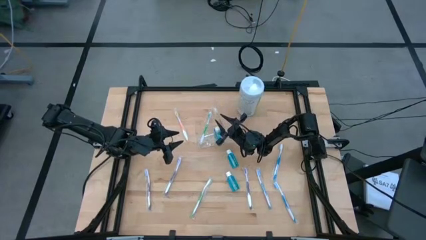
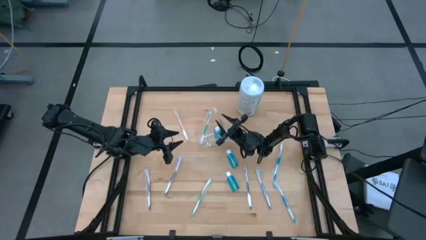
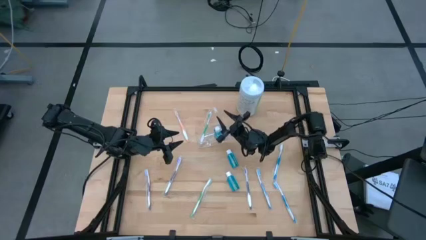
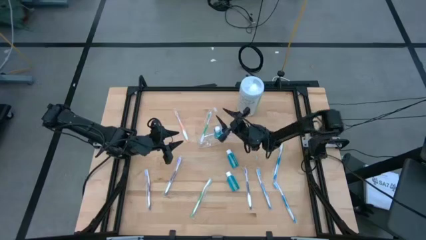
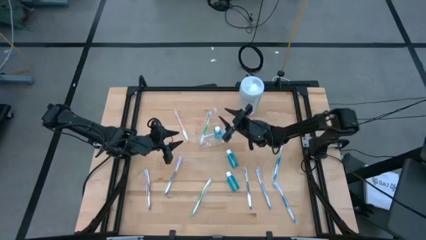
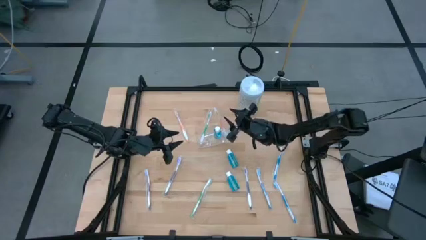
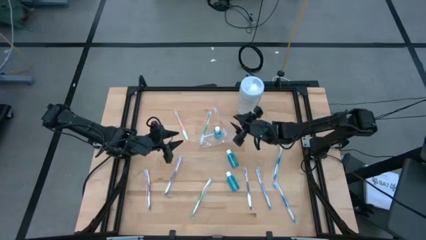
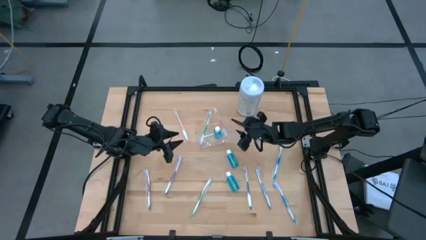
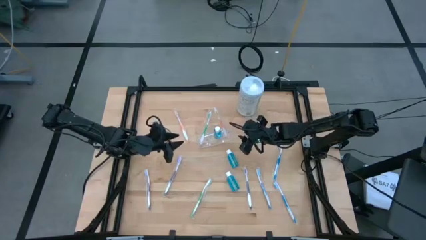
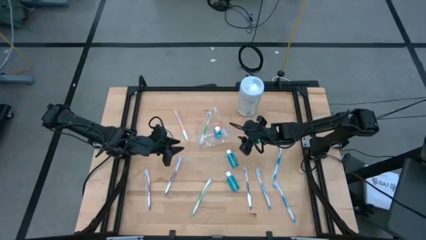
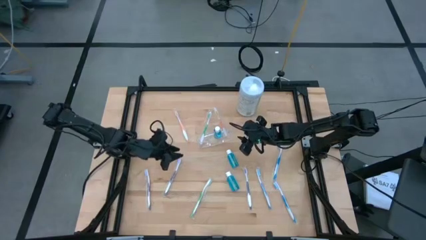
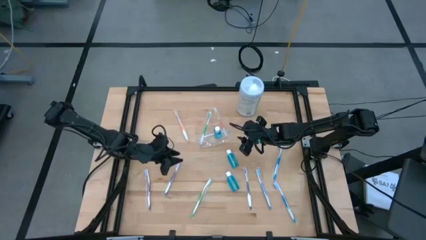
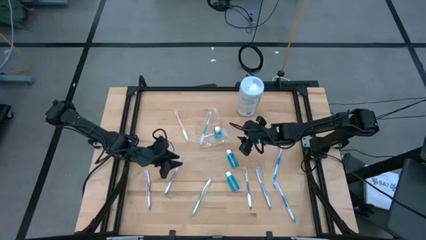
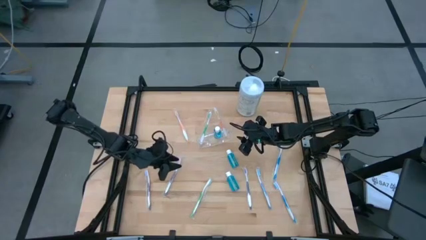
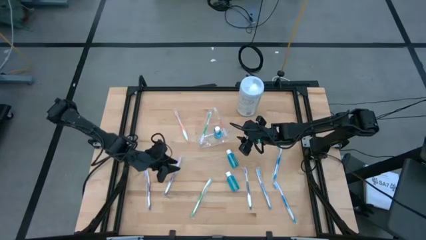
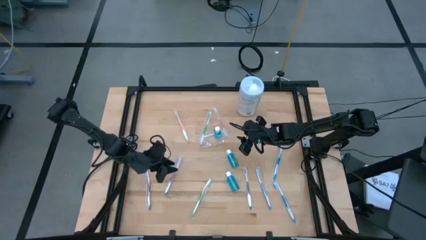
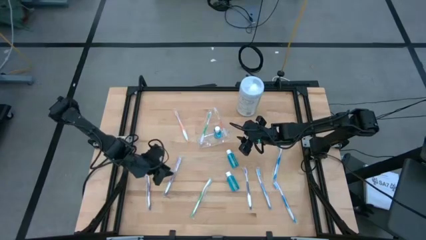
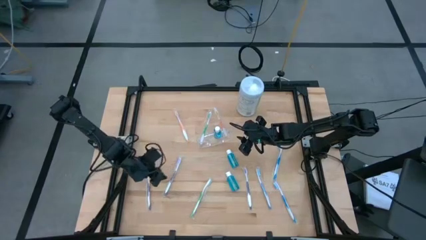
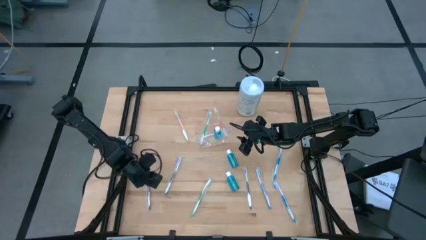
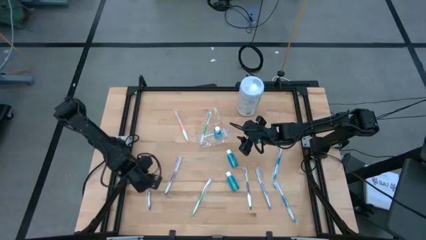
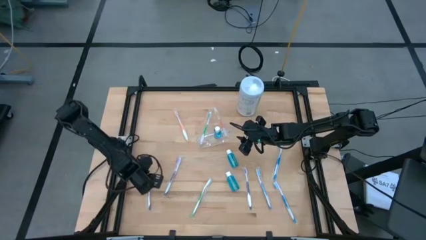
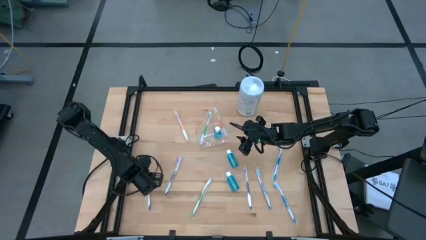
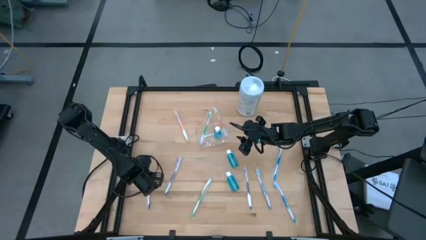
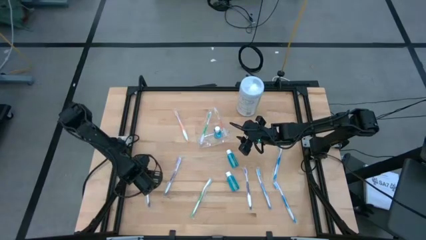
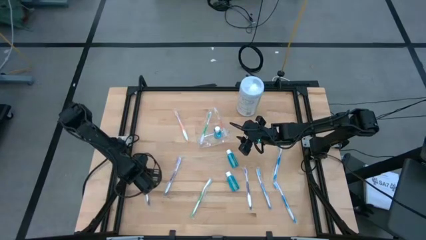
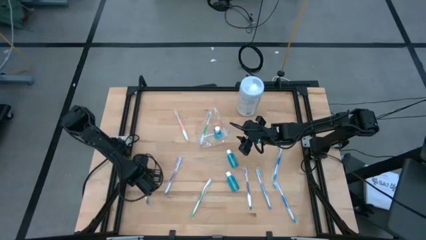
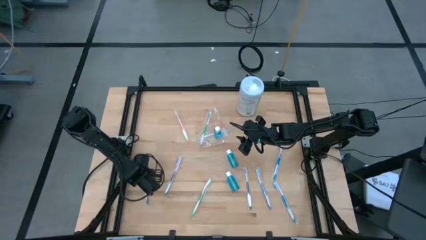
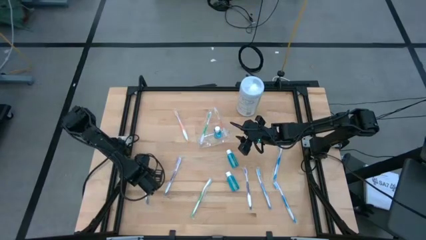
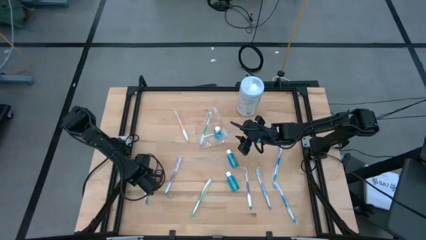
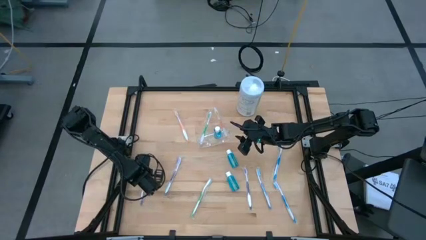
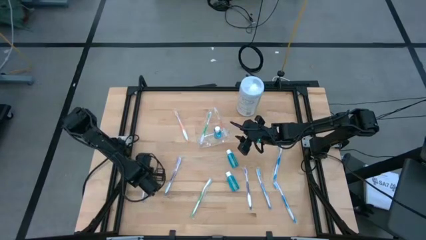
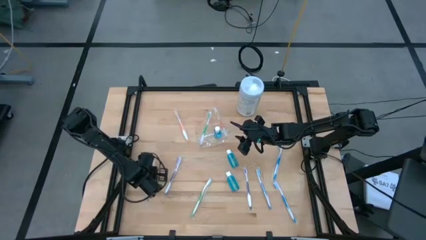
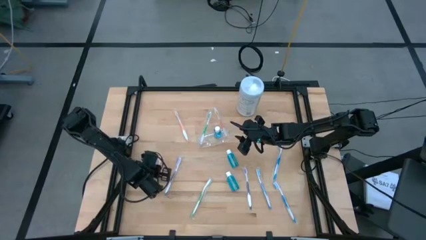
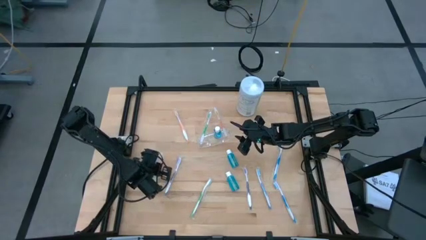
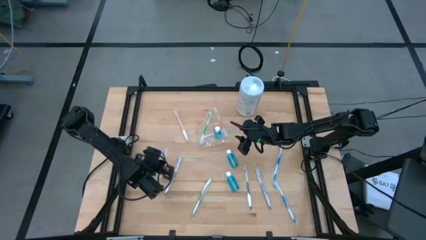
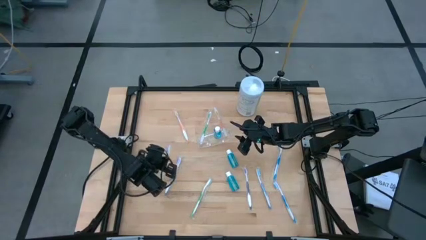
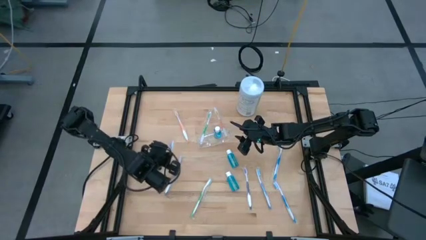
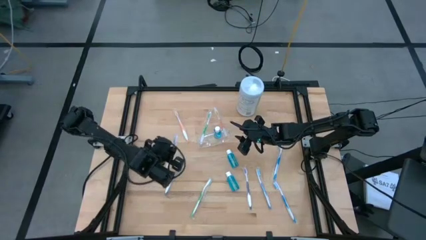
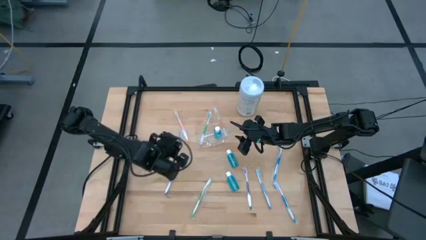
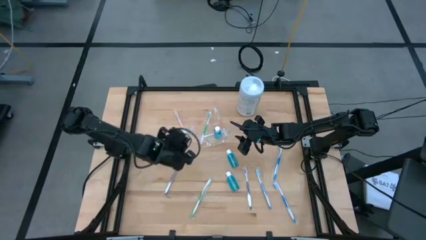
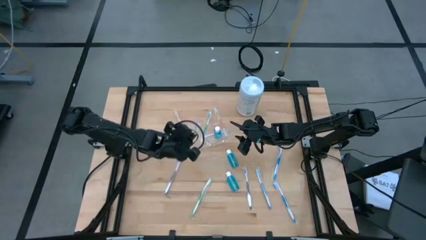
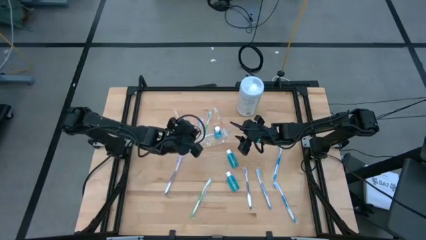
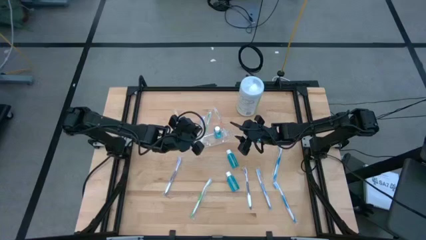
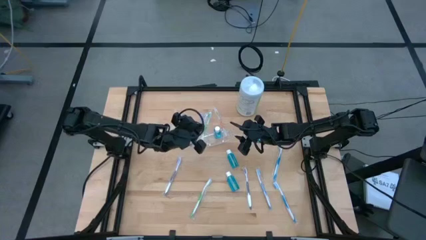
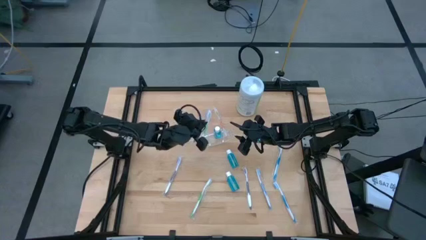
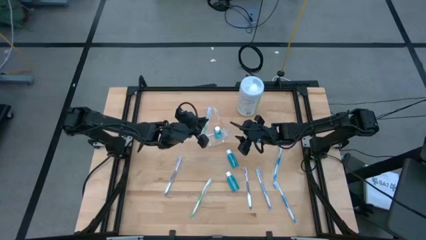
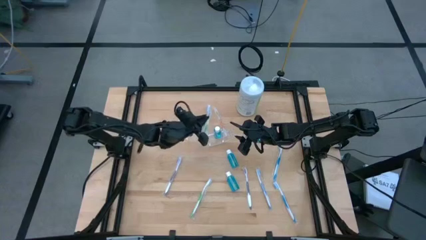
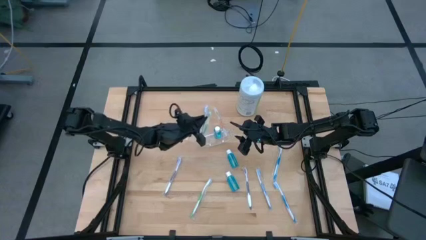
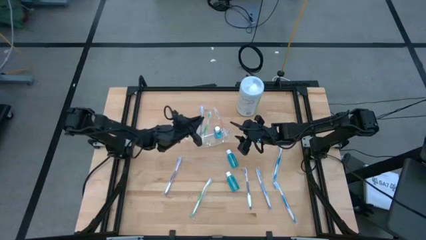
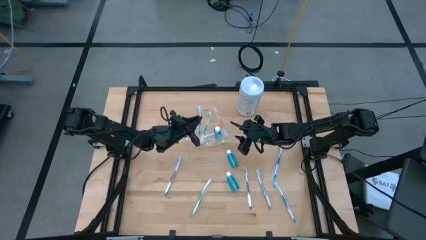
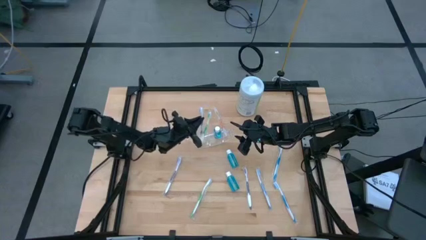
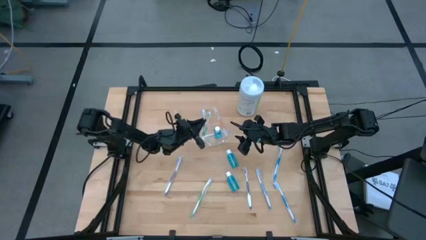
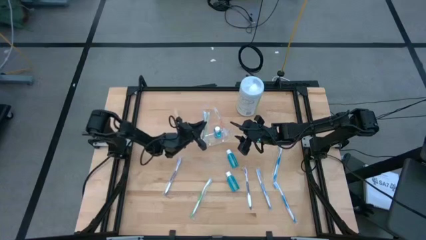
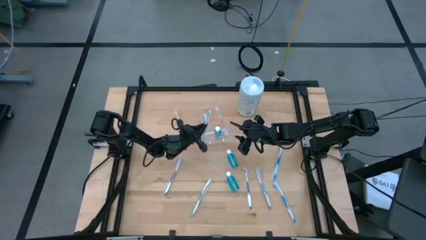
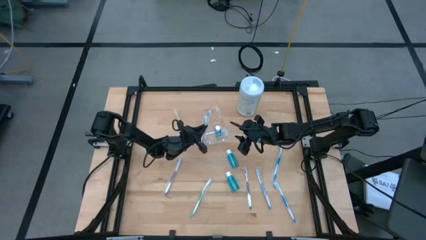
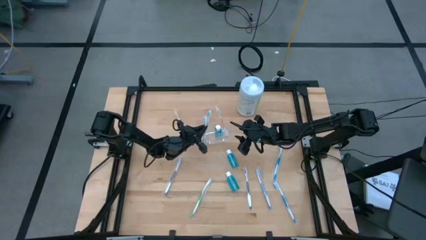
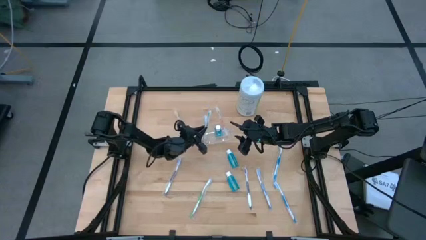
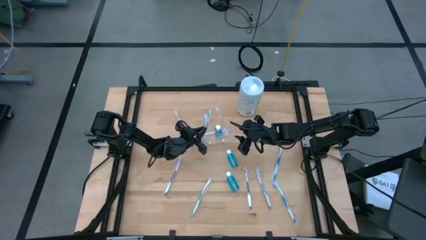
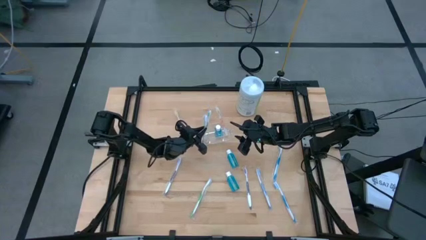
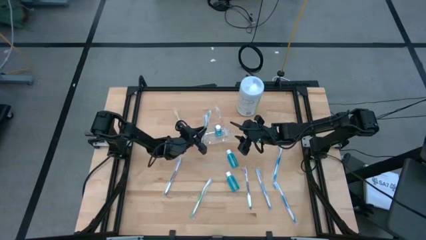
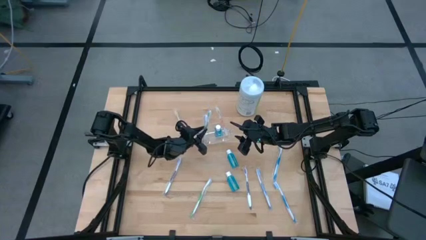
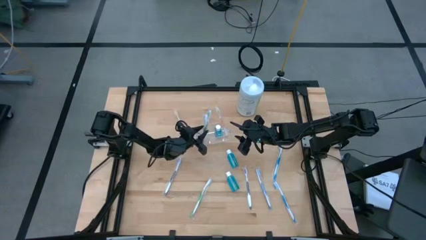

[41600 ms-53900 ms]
Task: Pick & Place toothbrushing station
Put the left purple toothbrush into the transparent organizer

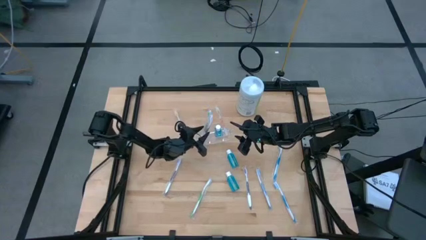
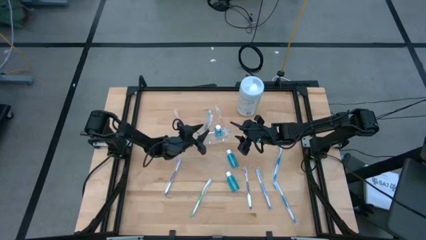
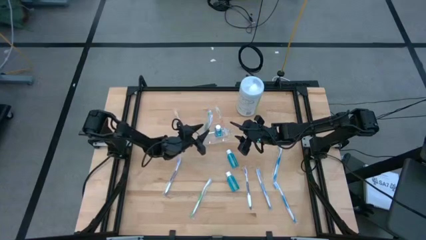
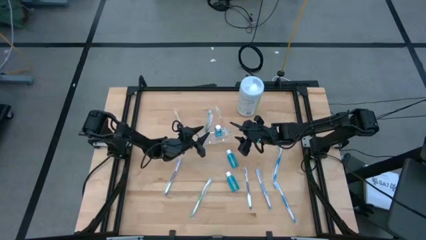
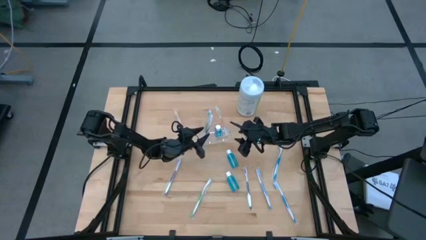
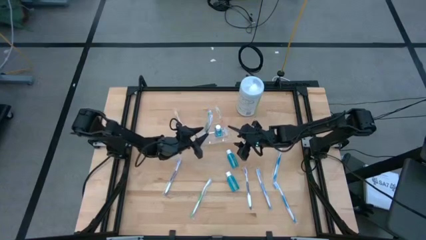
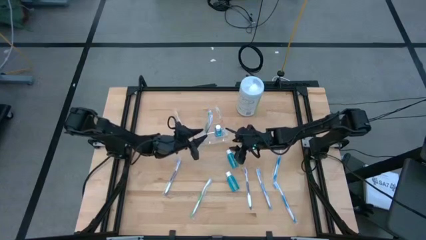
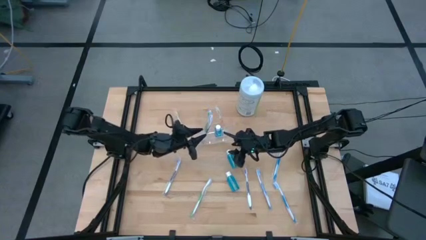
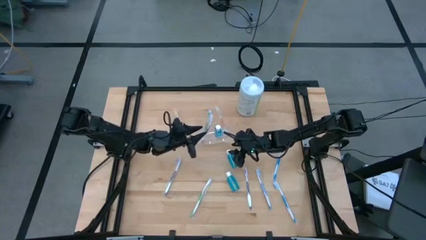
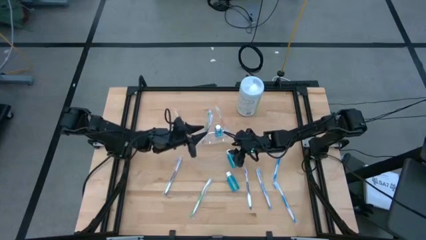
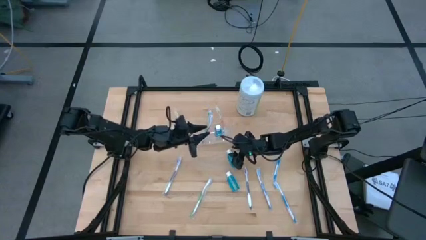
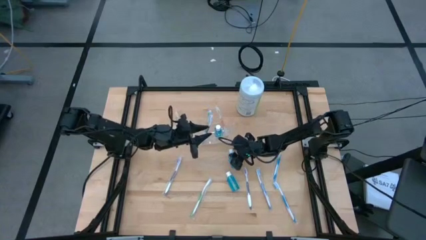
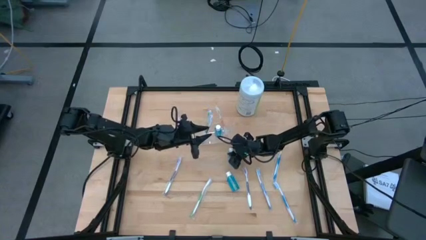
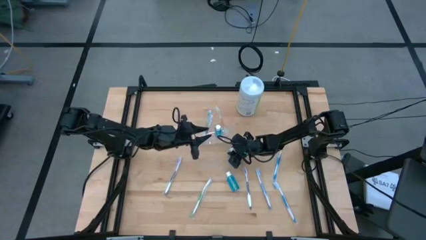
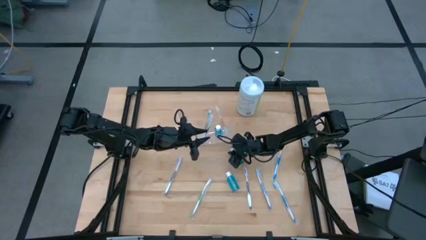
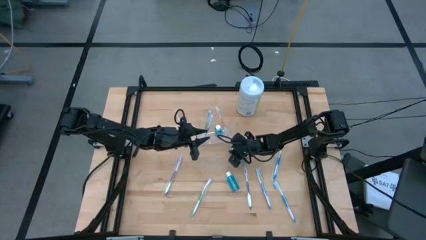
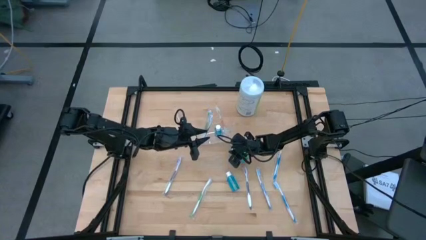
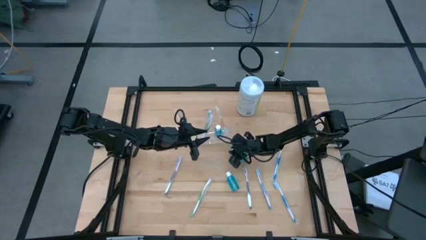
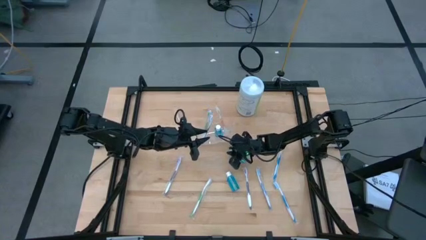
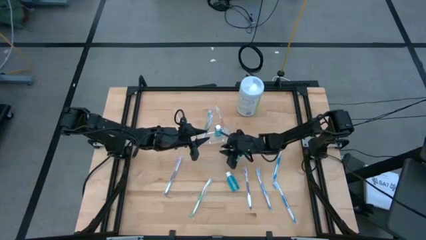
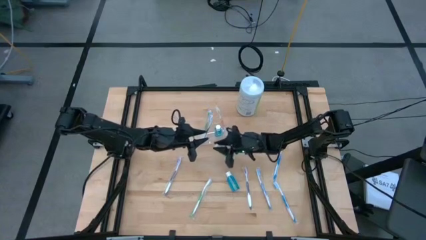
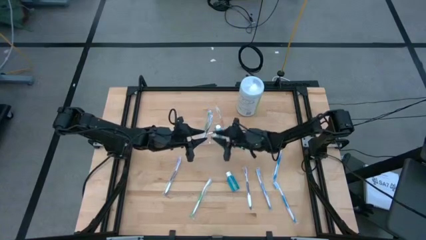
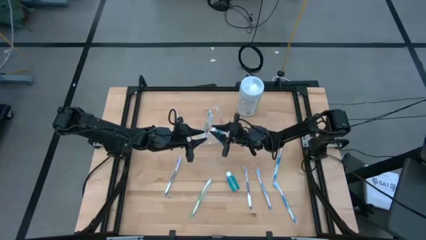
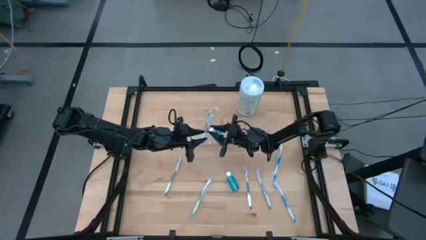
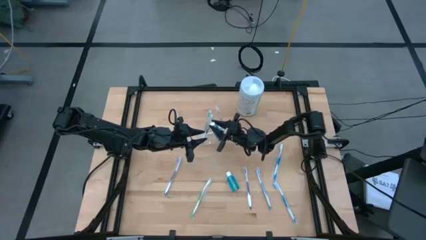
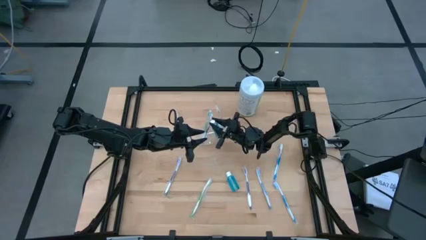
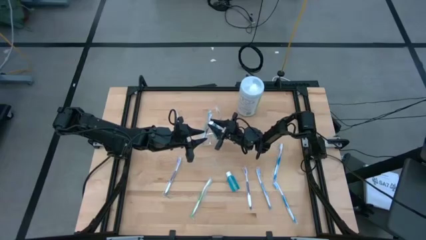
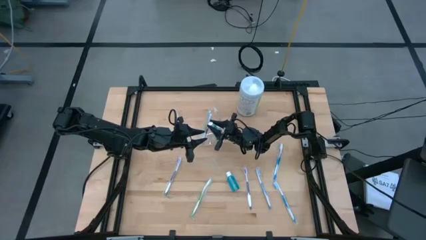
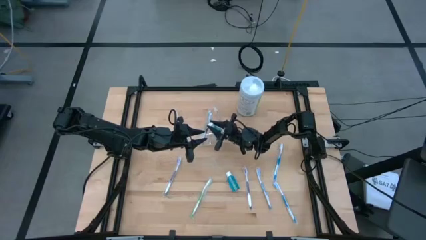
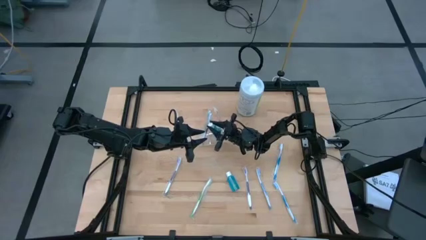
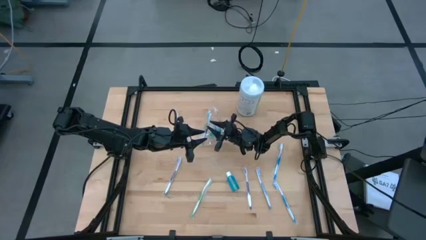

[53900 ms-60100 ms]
Put the top blue mouthwash into the transparent organizer
